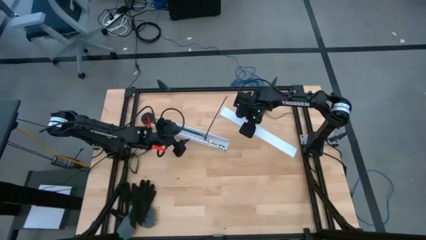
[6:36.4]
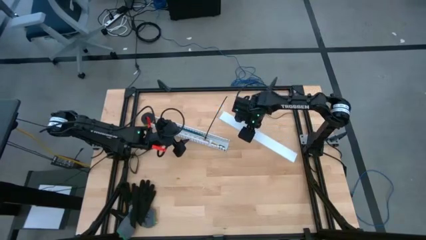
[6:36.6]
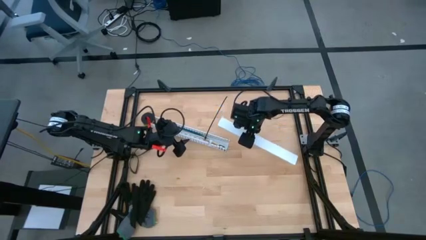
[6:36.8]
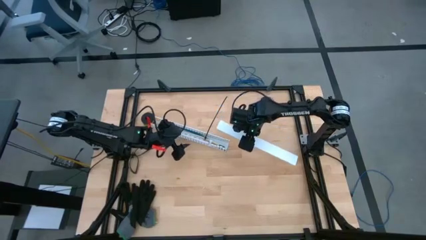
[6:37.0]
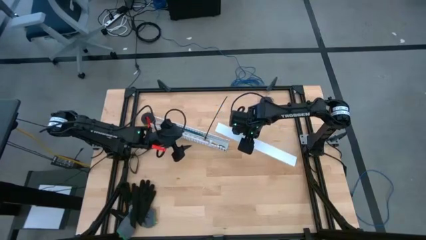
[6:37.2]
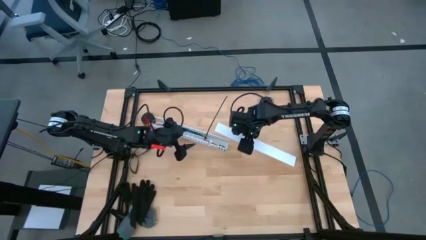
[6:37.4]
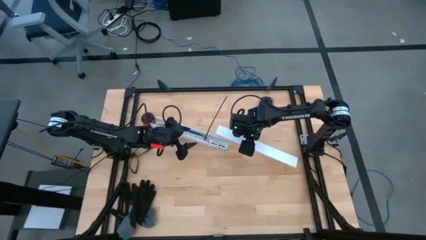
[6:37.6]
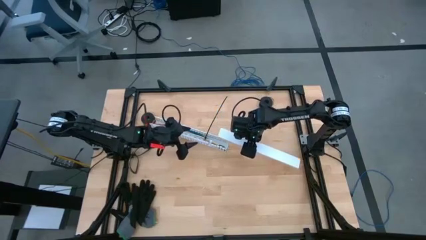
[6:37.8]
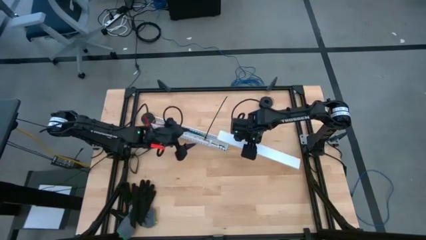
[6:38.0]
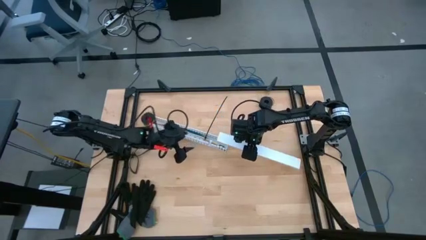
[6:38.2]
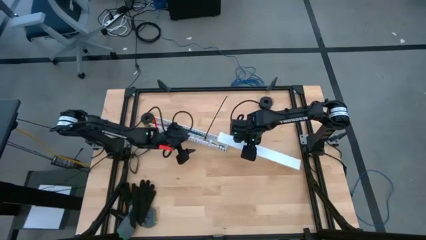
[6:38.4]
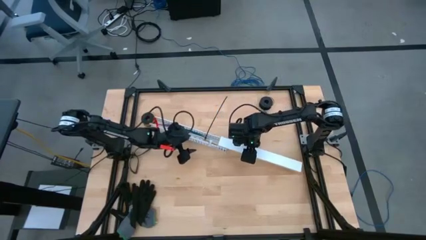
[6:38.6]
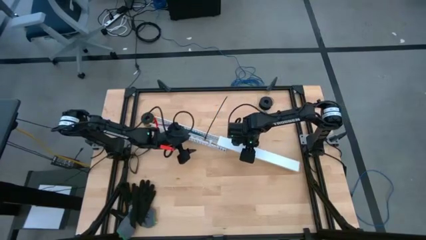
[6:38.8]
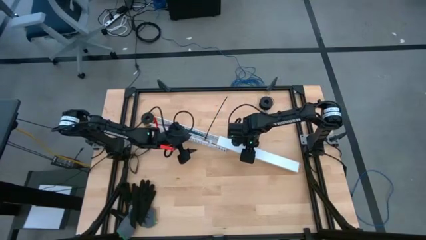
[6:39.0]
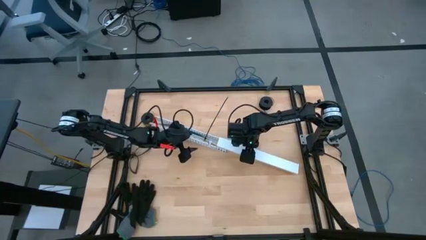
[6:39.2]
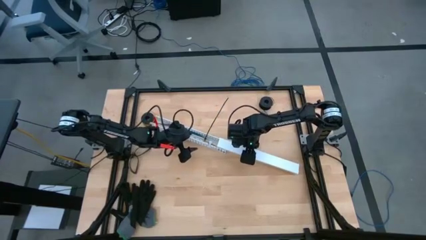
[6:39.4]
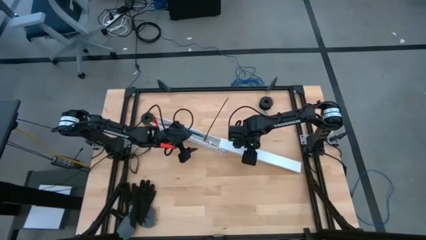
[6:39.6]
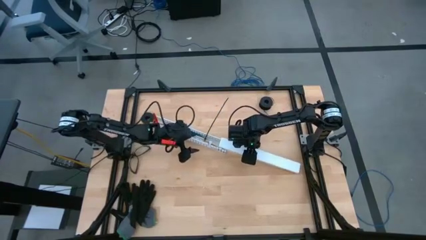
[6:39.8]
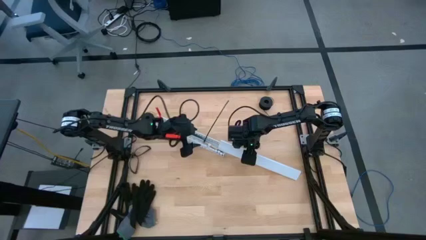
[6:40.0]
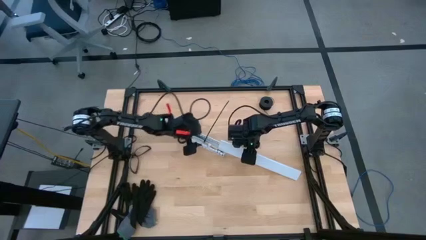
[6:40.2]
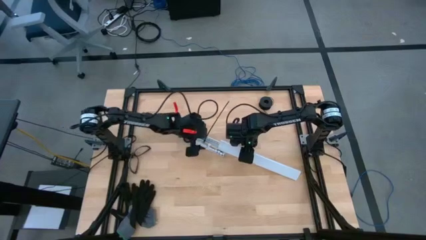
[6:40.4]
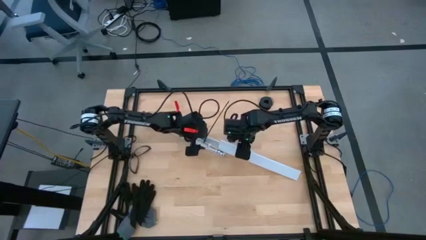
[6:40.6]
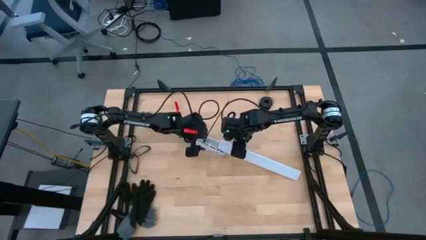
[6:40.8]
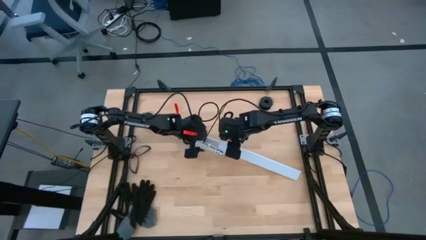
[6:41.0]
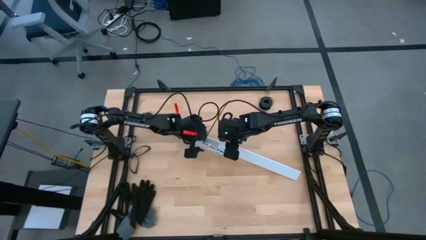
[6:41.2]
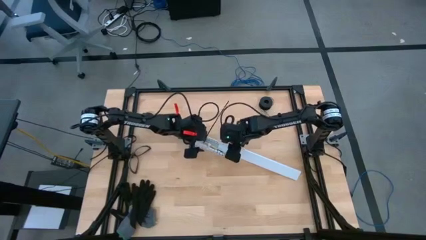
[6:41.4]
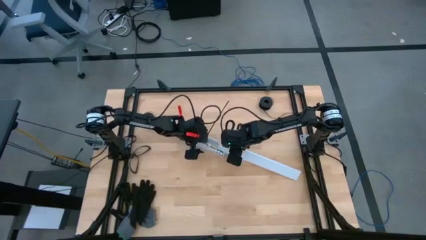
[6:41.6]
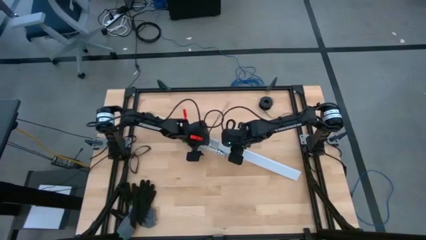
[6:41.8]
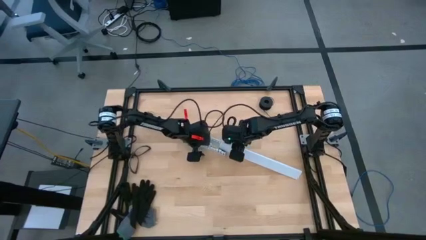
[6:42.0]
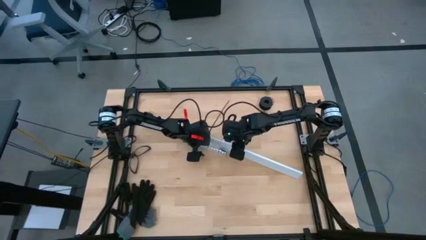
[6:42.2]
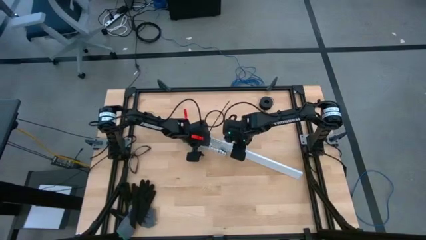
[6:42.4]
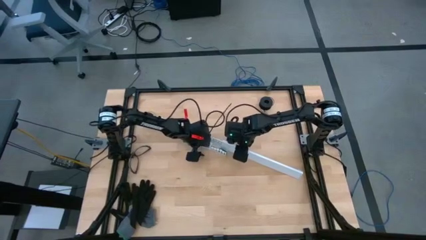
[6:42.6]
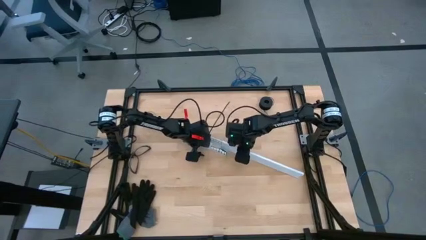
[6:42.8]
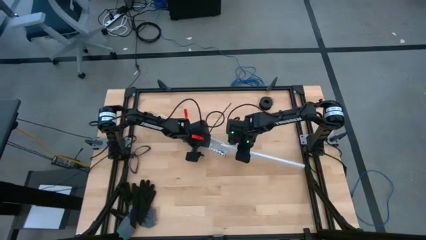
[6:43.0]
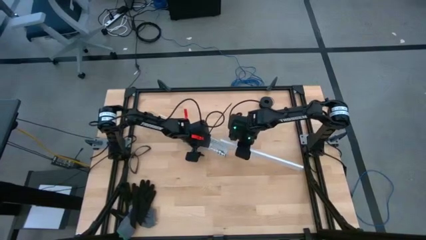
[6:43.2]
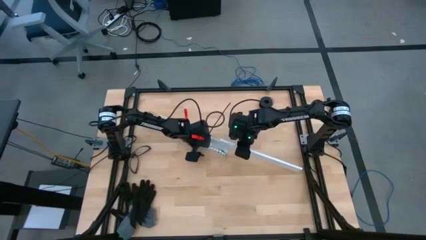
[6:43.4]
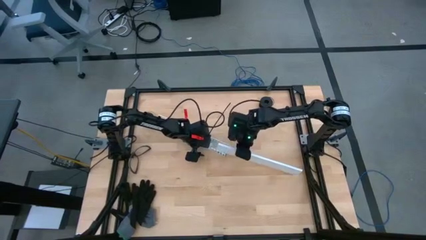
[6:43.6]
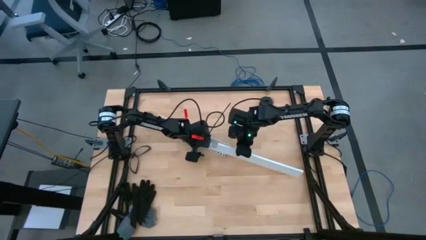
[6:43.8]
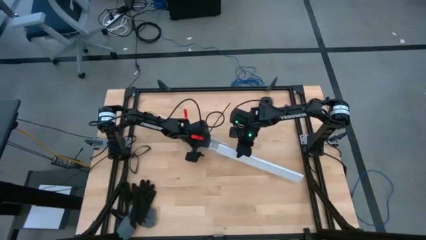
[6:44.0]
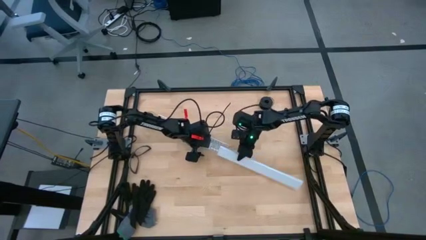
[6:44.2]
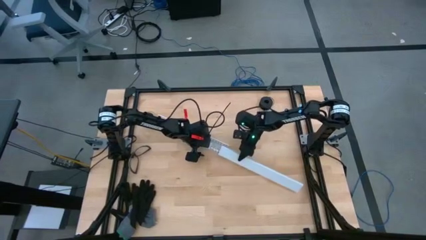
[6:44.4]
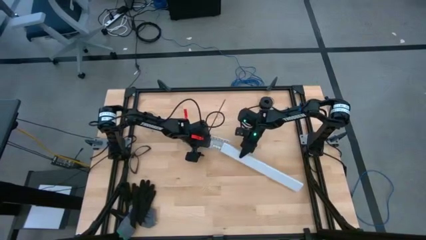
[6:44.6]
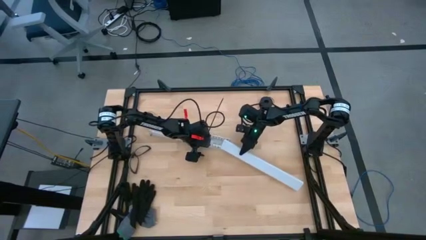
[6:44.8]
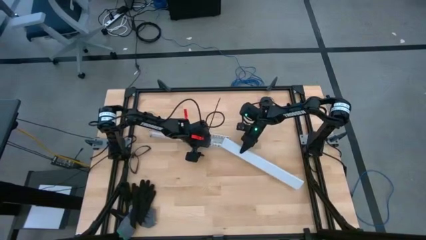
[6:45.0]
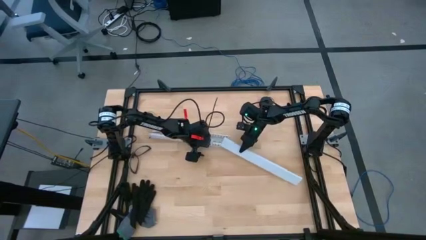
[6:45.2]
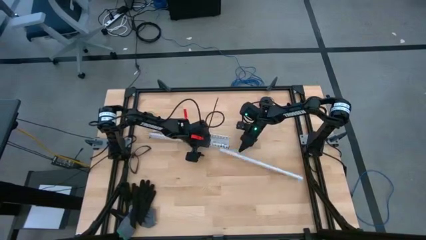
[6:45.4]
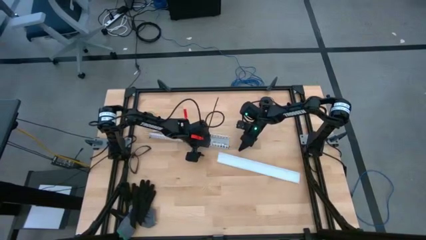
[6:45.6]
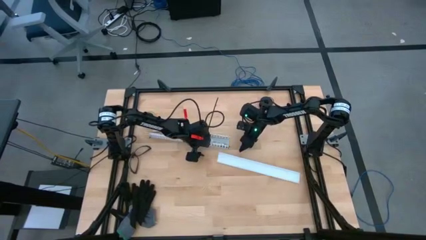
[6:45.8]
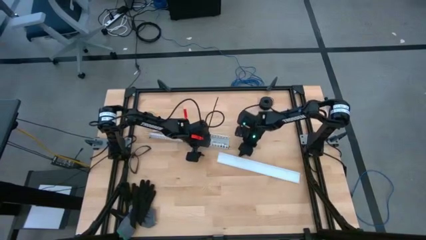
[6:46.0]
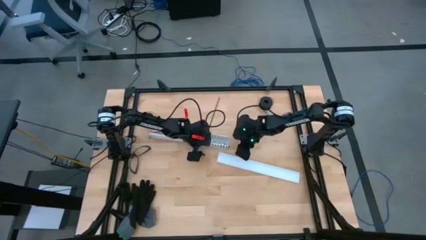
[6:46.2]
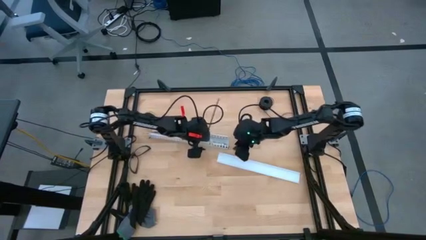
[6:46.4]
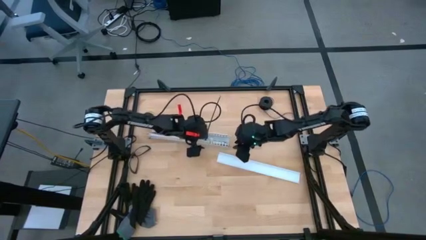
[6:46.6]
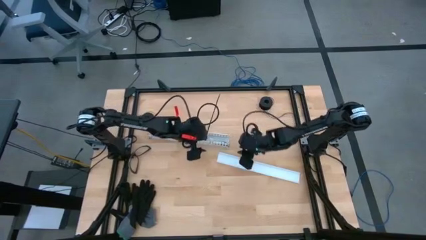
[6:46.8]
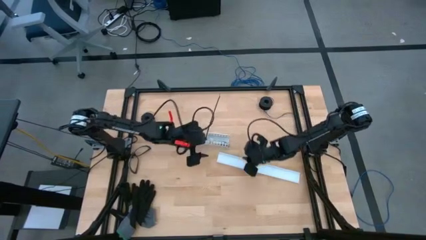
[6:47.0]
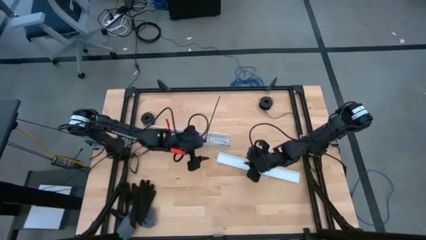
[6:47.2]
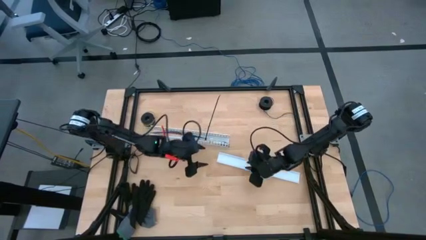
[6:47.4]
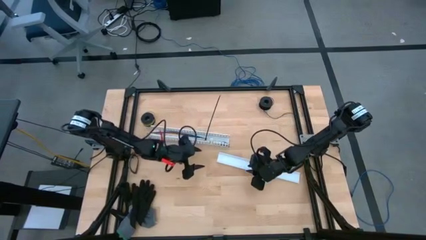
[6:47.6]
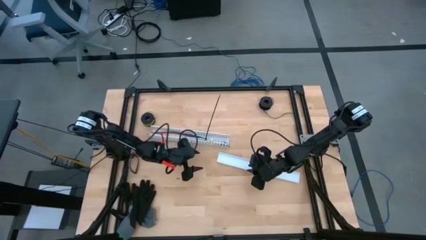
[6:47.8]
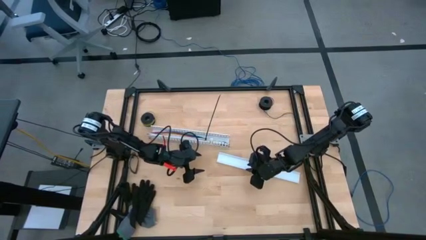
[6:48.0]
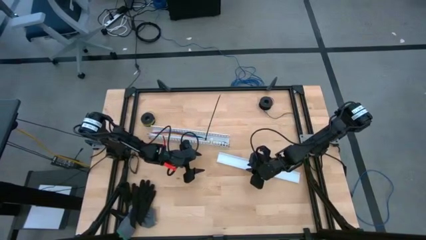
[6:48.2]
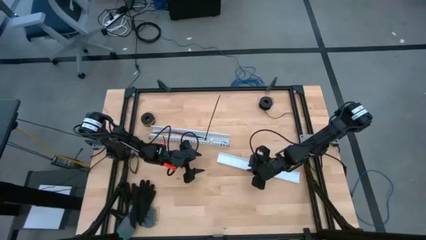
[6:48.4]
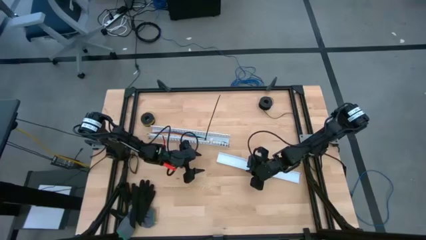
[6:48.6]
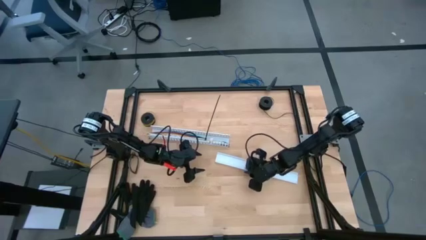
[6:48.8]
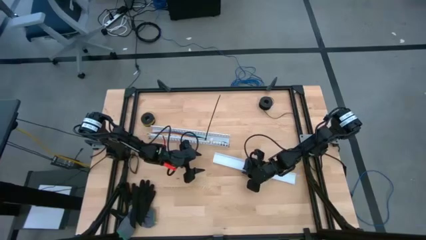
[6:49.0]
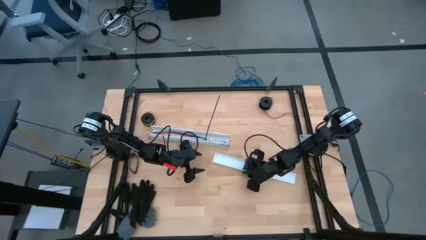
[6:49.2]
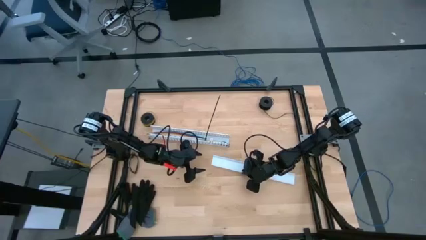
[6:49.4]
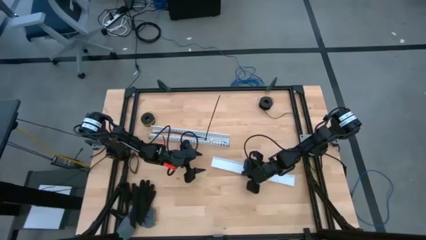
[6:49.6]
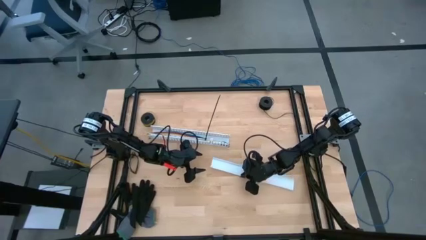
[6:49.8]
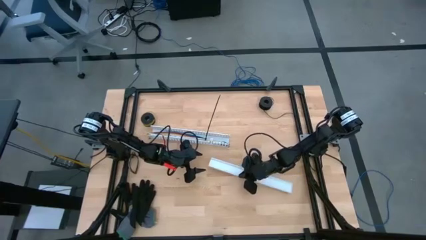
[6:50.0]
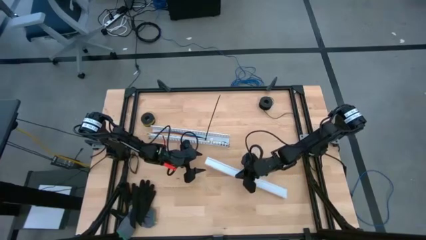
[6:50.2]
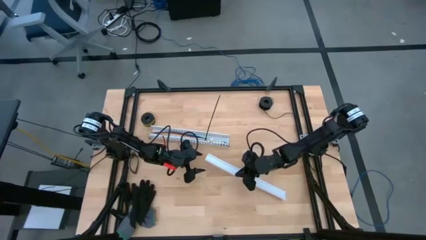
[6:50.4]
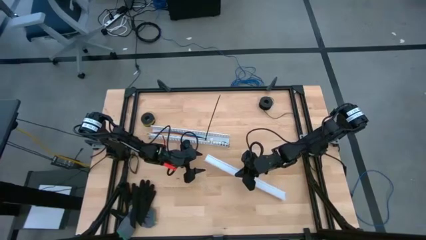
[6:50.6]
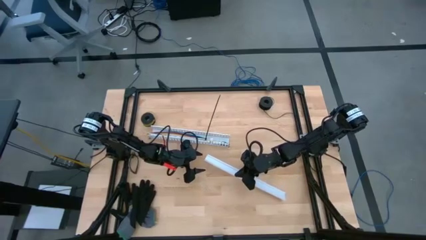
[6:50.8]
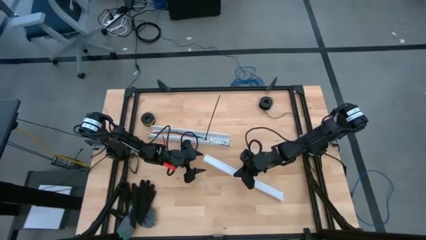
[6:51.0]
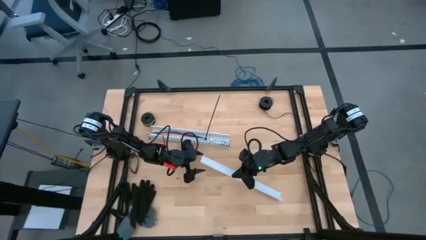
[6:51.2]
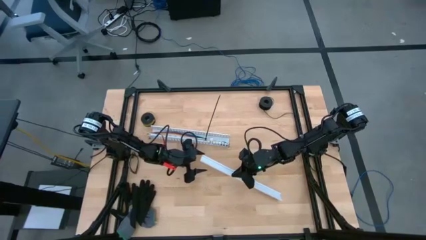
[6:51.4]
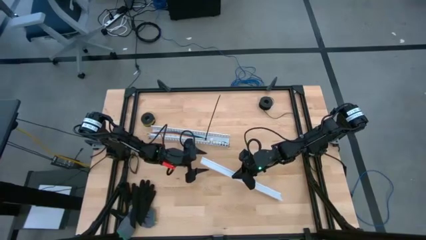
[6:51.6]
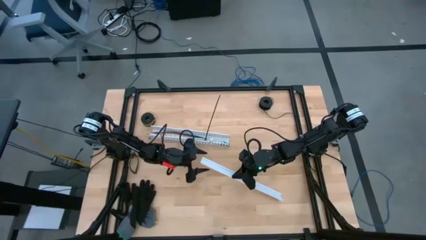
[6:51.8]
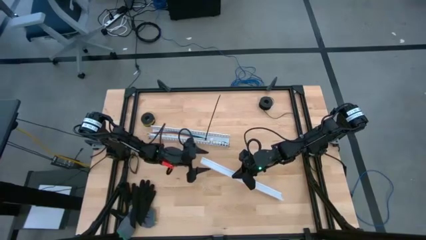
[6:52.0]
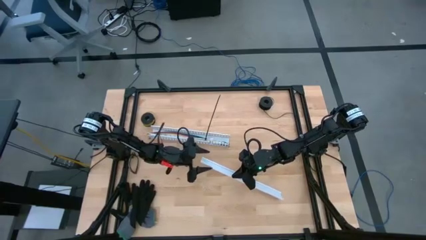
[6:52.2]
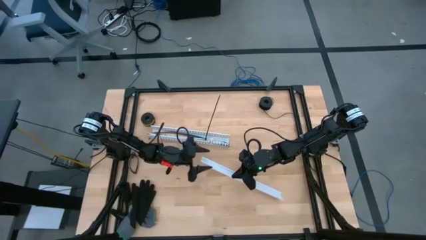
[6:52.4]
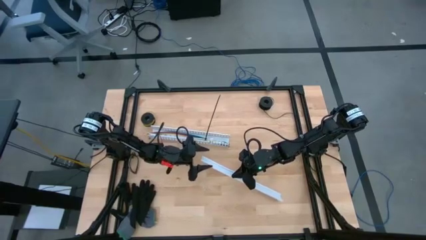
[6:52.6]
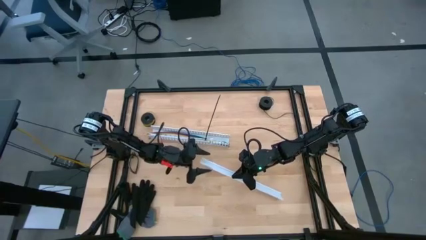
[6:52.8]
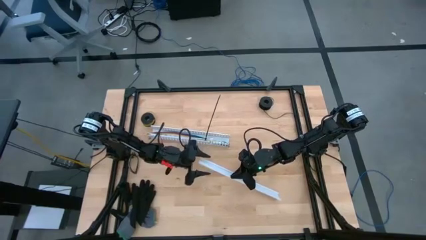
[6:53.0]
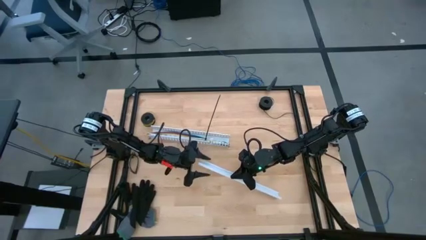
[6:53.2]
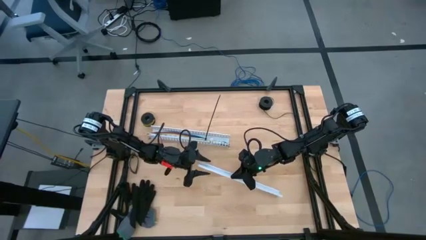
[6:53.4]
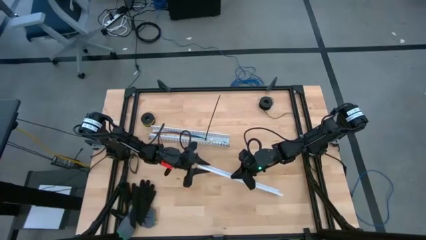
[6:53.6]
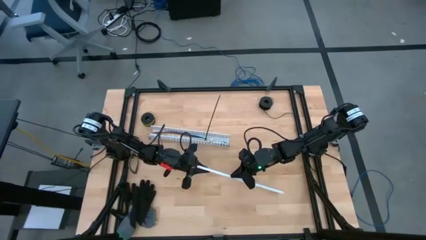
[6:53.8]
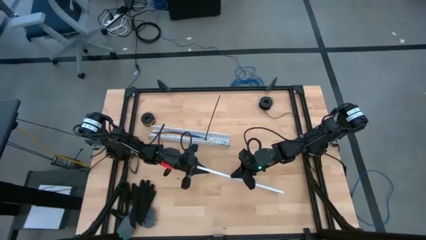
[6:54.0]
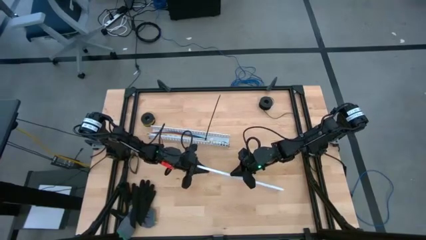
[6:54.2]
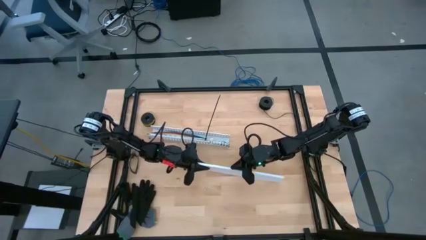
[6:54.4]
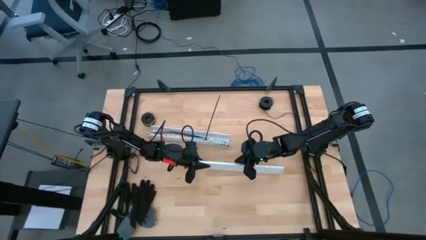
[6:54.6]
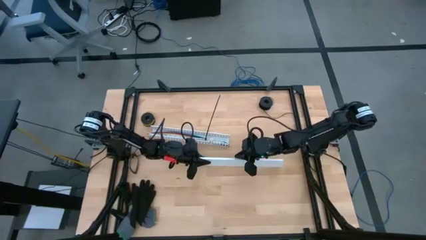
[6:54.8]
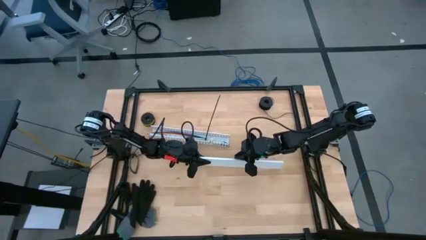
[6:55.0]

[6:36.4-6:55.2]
Task: Ziptie cables
Close the white cable duct
